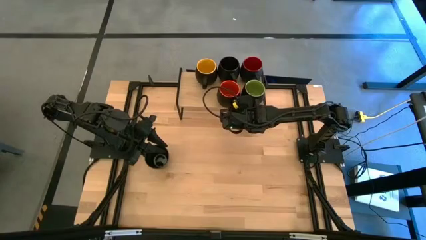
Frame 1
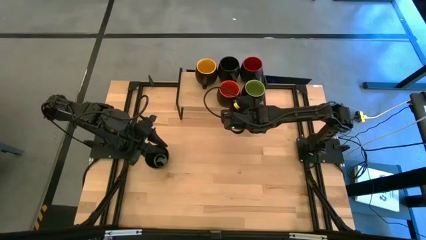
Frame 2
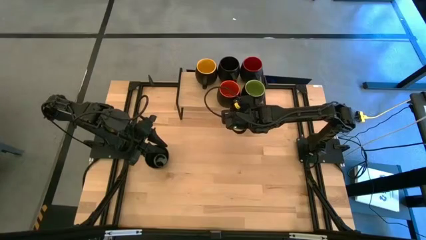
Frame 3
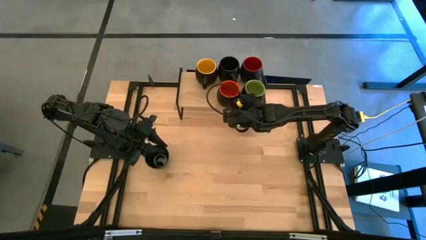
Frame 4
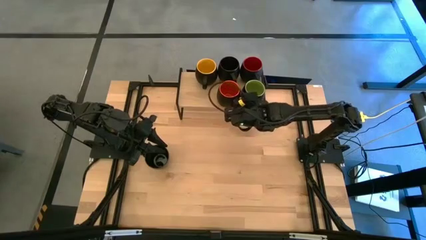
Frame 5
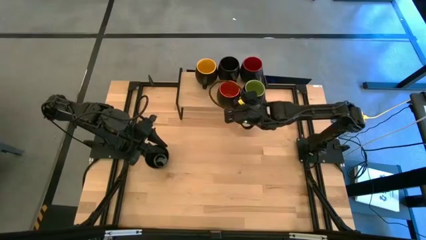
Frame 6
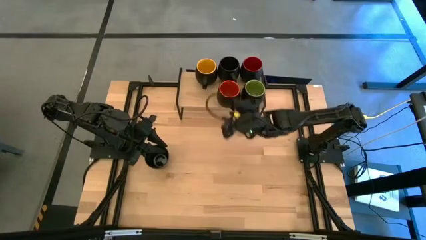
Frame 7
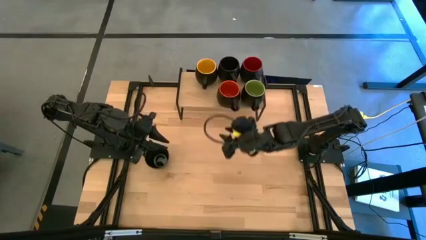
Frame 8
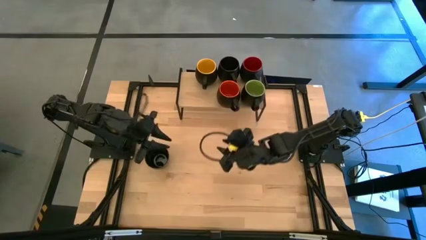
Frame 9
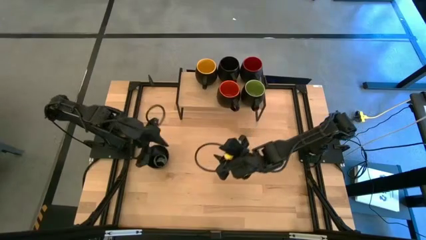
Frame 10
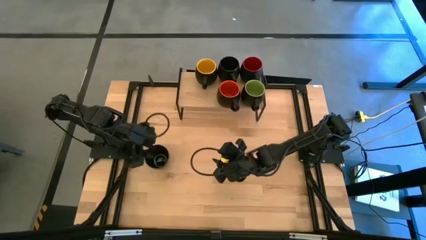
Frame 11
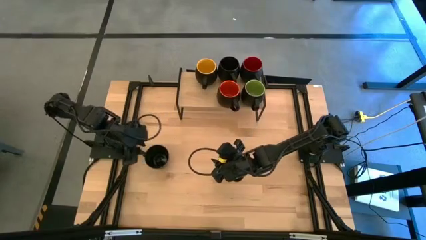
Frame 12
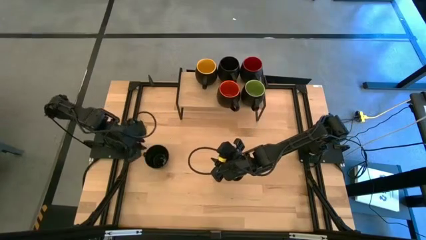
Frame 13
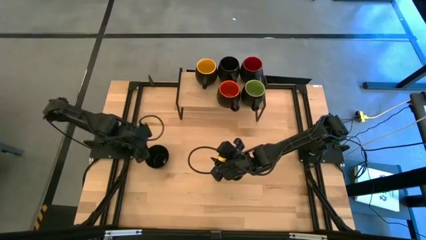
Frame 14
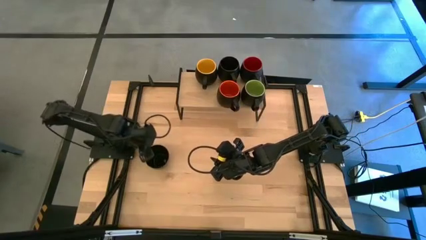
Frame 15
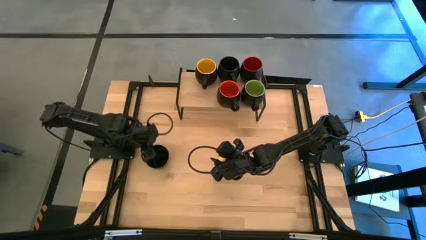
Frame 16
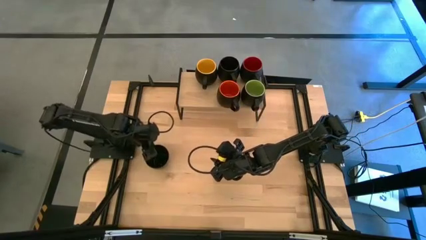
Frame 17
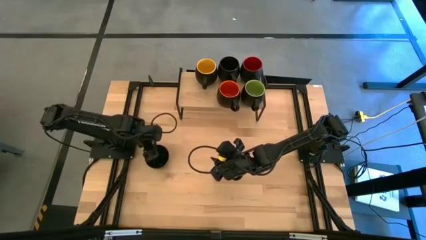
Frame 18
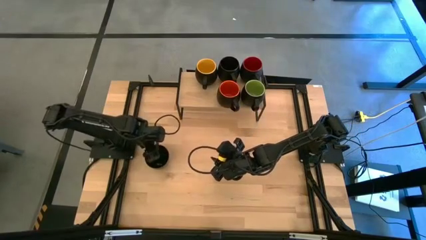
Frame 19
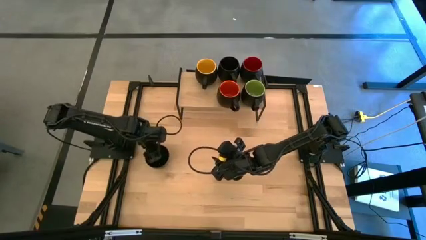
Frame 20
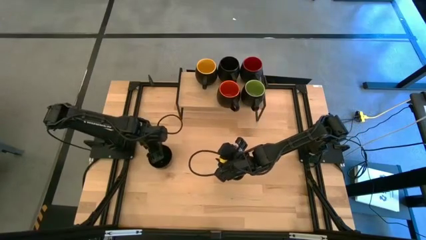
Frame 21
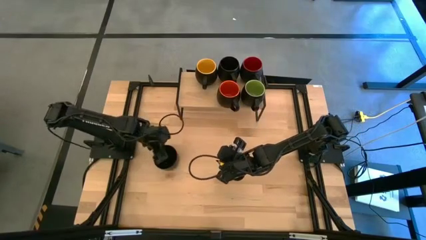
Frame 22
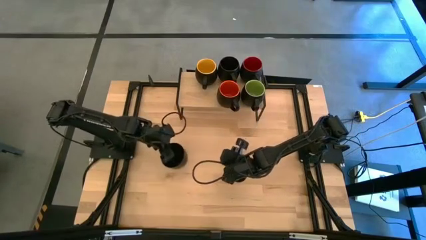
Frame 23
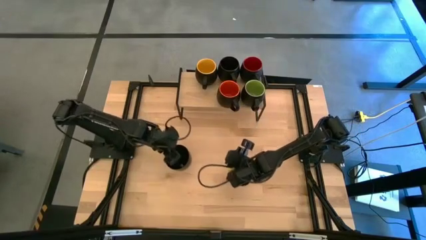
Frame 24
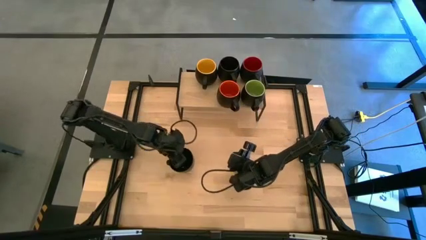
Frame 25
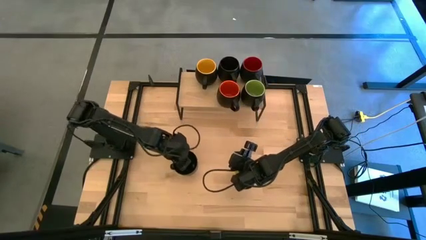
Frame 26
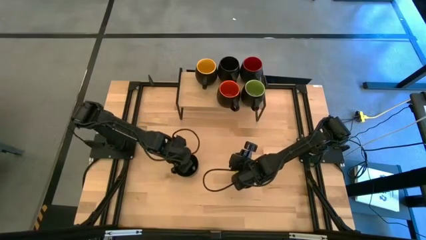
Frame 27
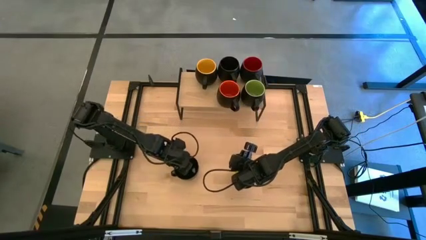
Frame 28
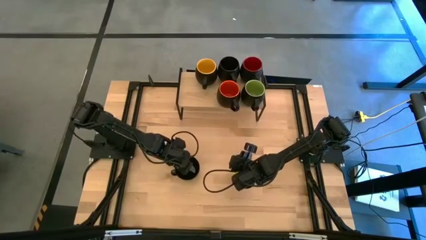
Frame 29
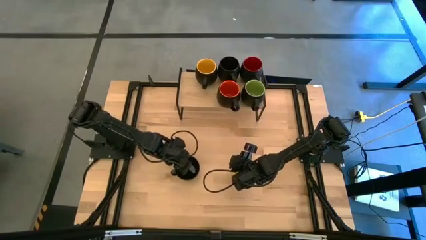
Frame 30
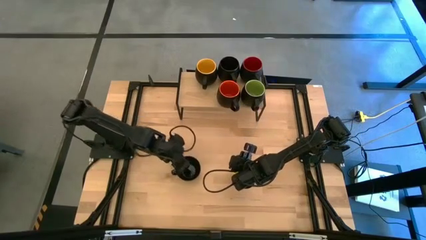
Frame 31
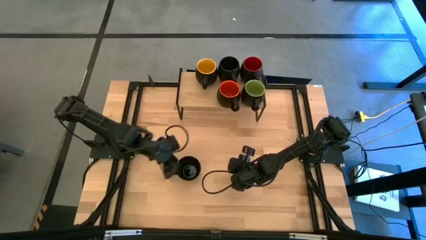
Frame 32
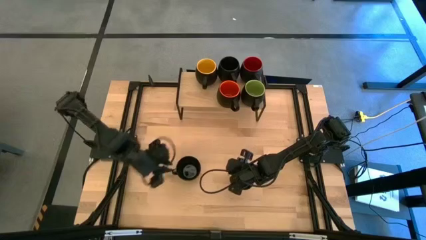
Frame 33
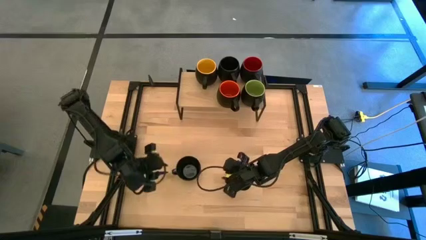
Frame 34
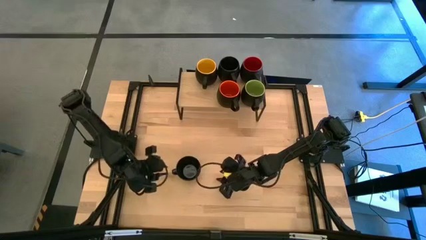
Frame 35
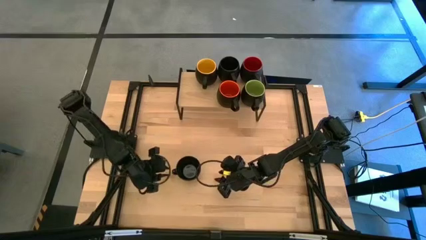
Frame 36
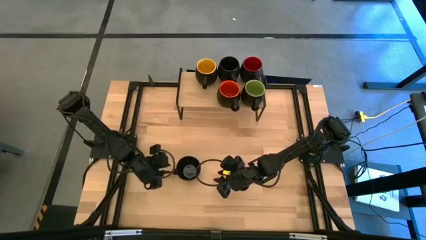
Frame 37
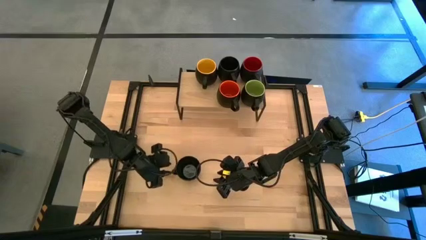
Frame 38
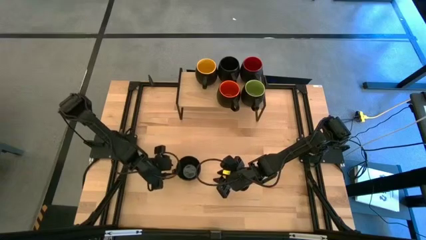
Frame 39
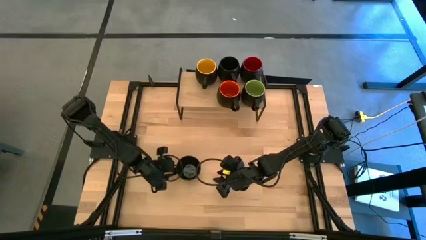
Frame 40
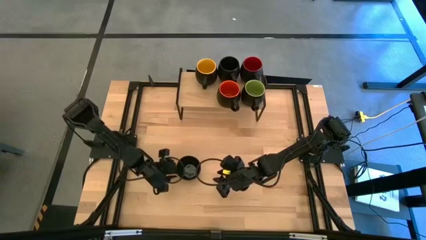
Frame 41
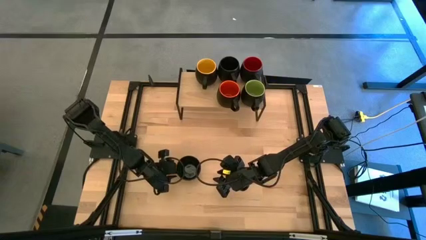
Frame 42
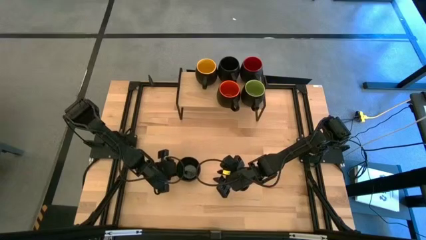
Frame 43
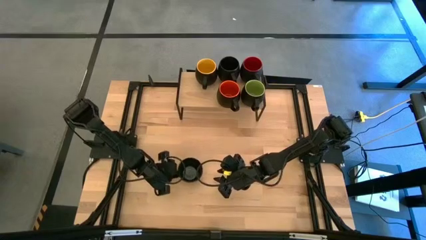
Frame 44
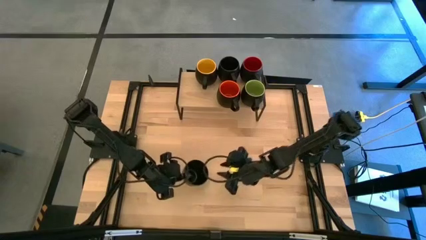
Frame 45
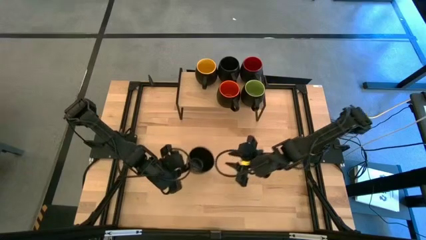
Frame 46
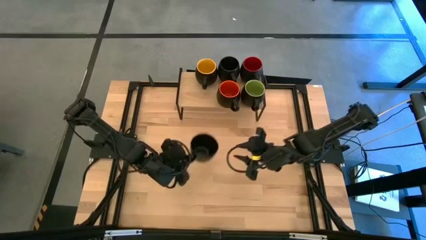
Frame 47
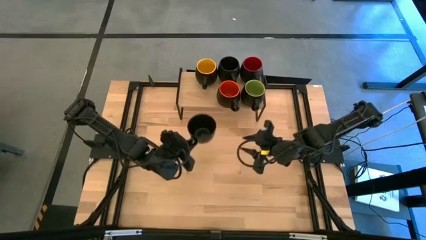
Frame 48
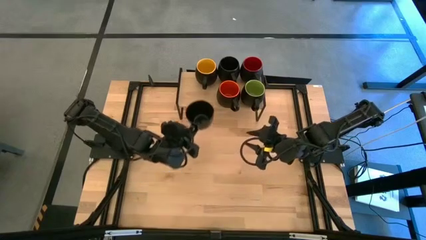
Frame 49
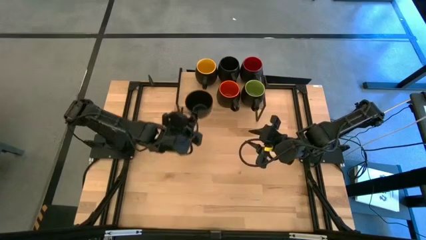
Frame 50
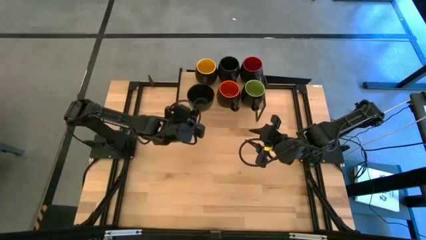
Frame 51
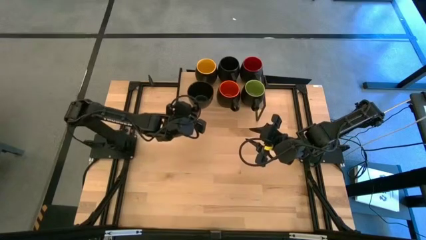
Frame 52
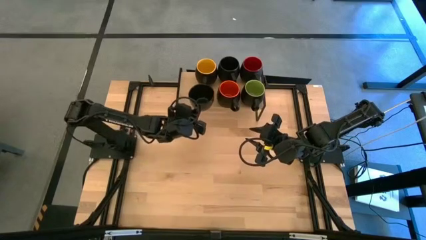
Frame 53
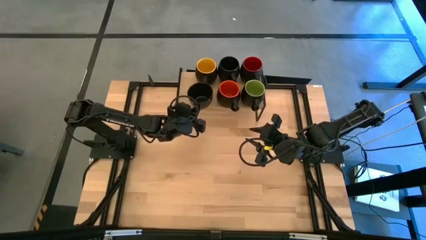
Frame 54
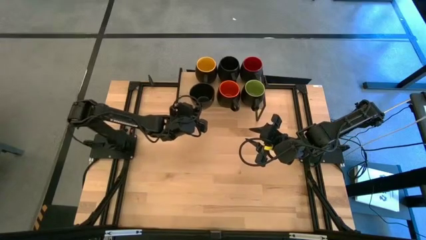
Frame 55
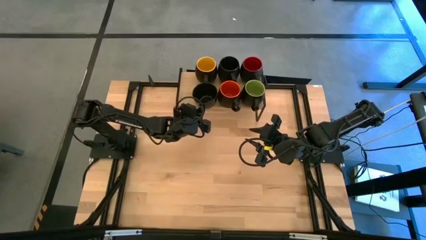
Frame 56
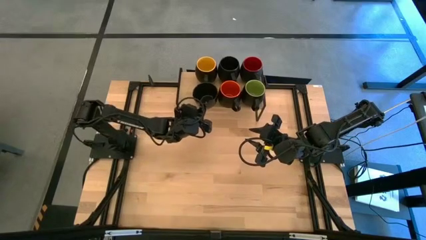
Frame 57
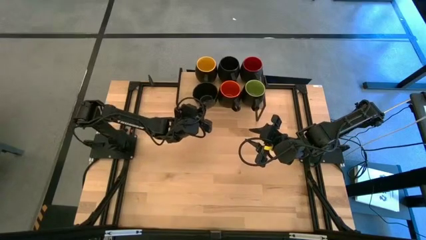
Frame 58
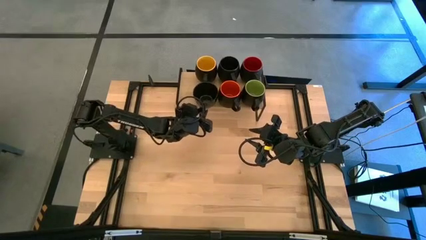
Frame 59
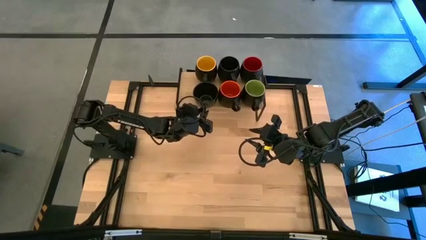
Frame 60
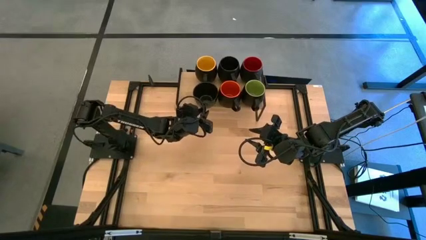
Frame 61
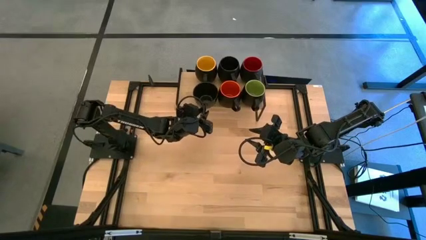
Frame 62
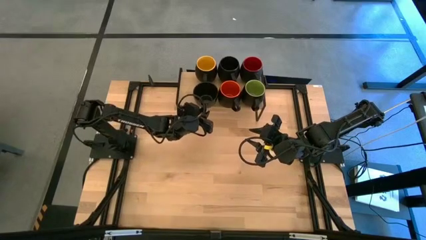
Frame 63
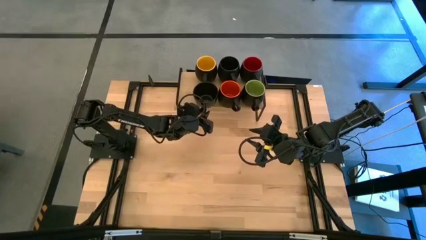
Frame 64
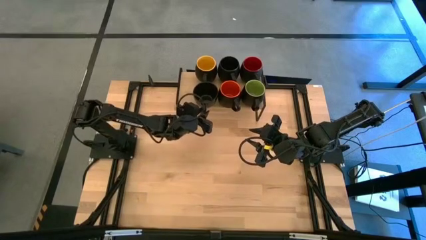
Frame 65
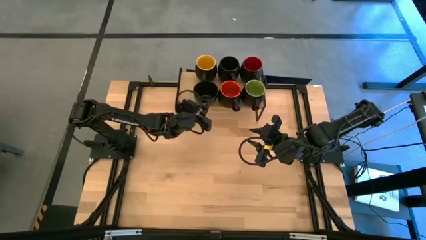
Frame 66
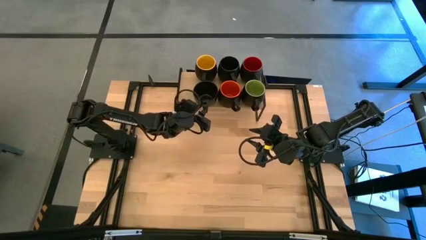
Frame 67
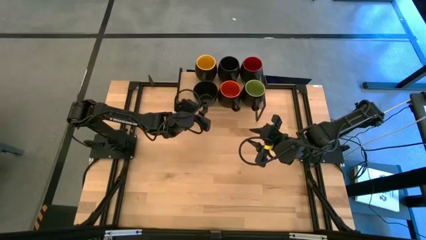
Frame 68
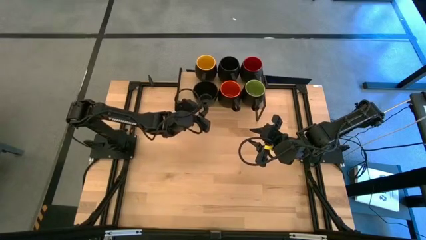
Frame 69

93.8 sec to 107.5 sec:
Task: Place coffee mugs
Put the black mug on the shelf

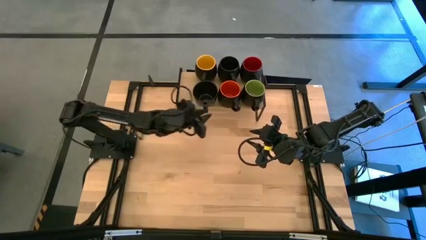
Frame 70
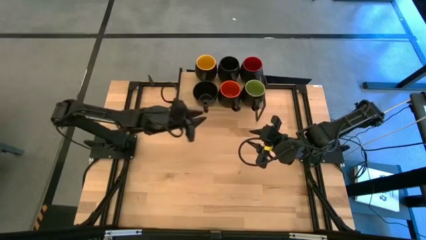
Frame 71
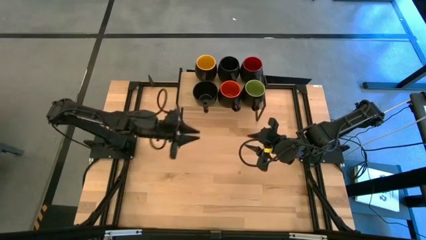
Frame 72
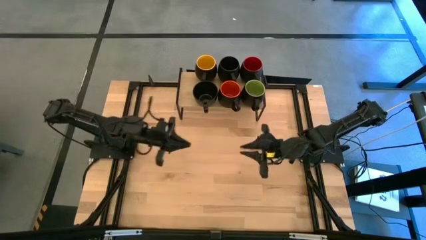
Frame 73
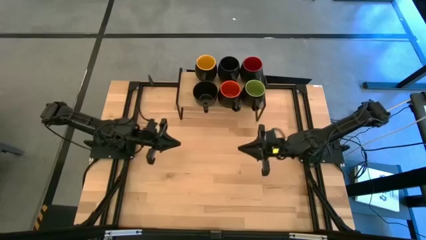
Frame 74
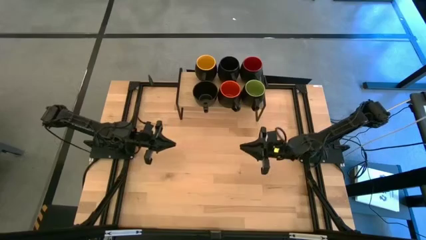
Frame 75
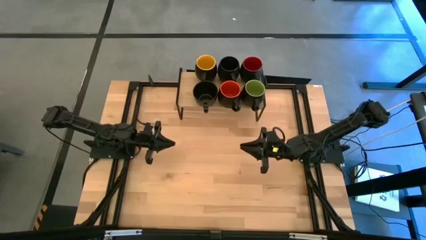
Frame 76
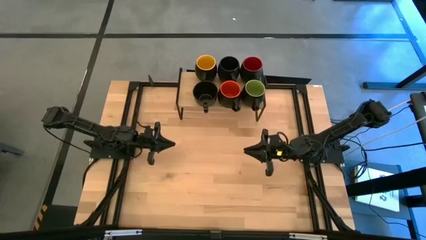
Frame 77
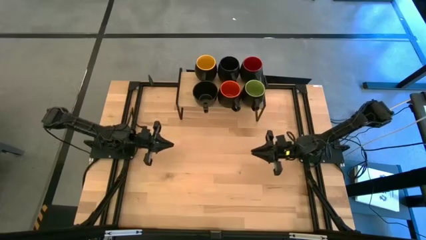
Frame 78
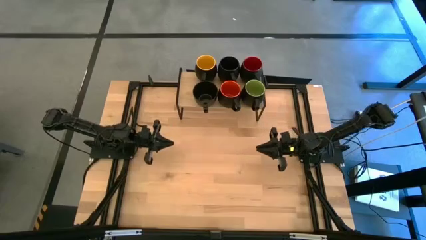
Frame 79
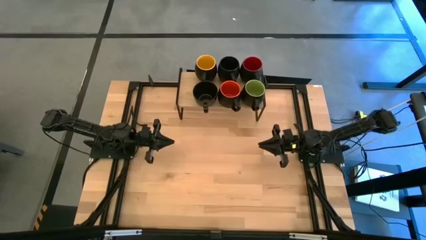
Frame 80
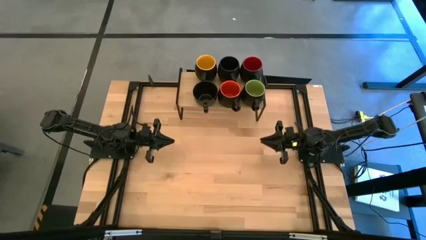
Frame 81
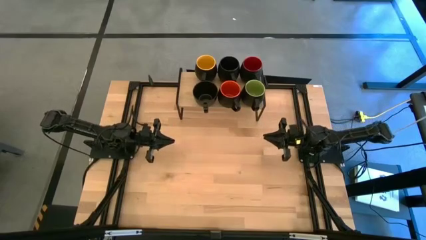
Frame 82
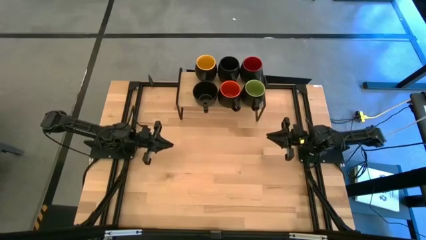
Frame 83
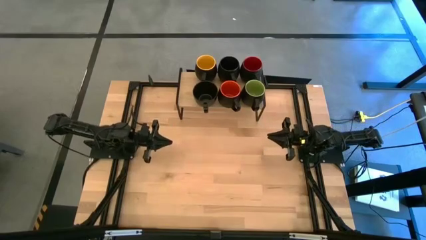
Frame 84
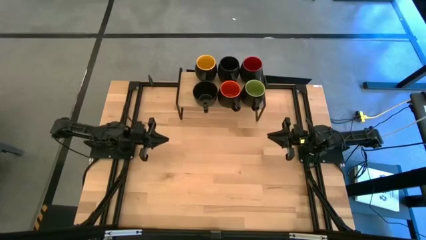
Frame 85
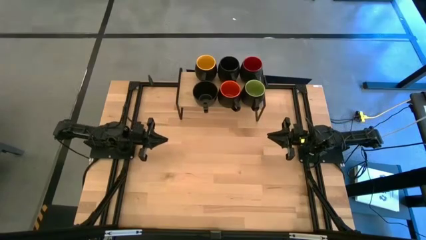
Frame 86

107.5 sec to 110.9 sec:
Return to Home Position
